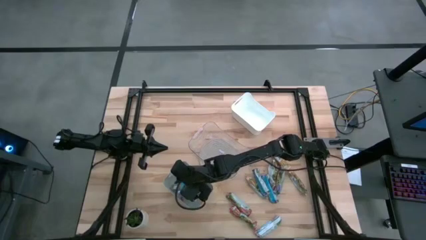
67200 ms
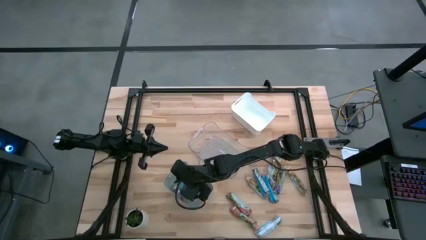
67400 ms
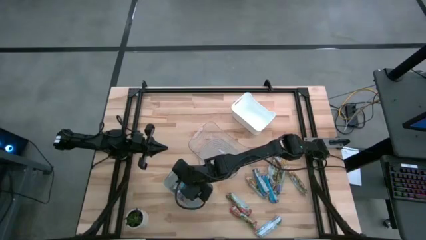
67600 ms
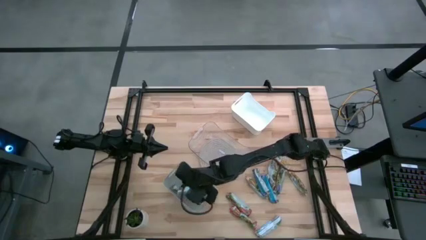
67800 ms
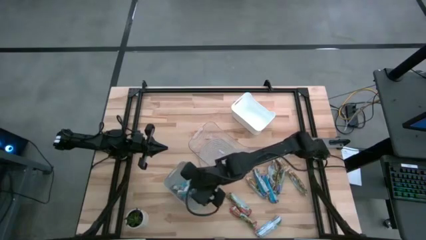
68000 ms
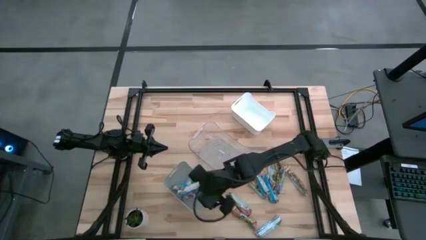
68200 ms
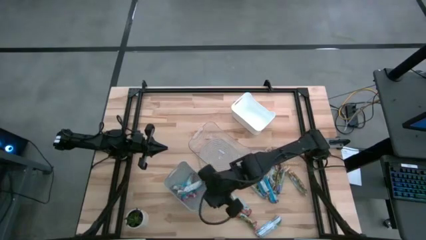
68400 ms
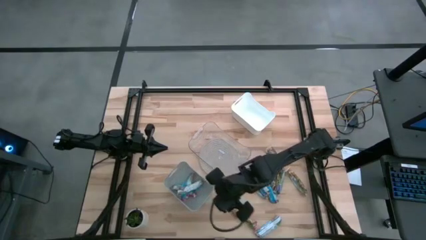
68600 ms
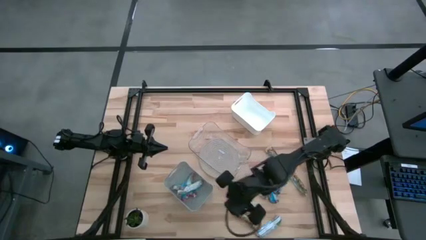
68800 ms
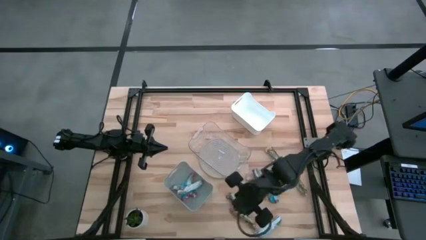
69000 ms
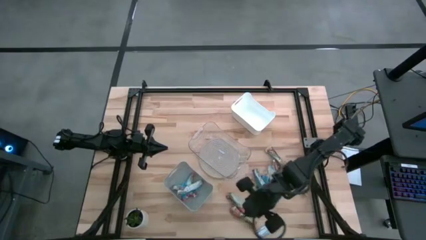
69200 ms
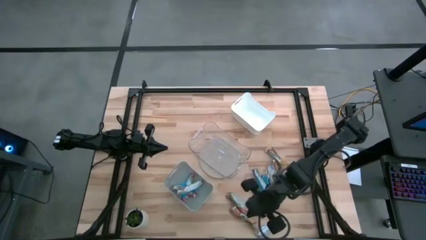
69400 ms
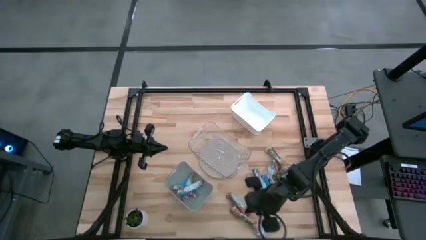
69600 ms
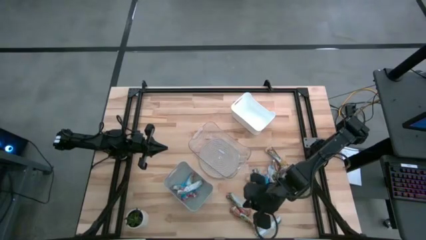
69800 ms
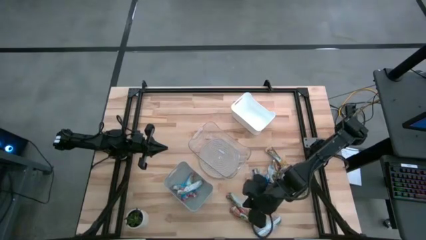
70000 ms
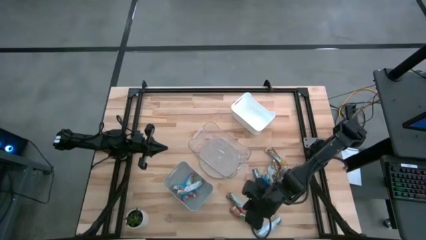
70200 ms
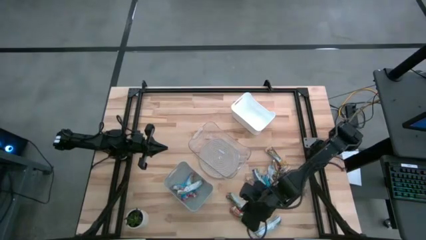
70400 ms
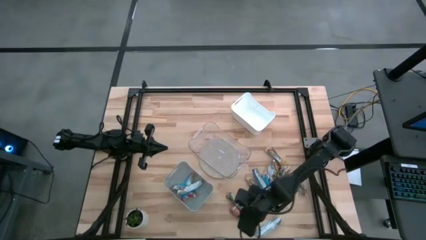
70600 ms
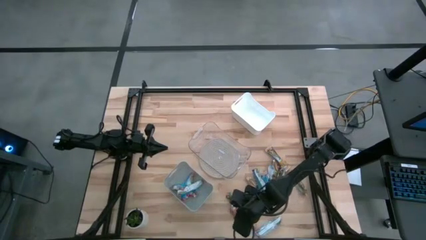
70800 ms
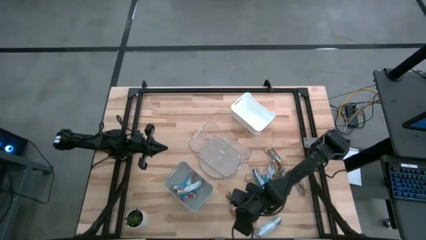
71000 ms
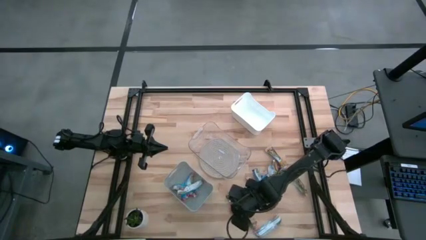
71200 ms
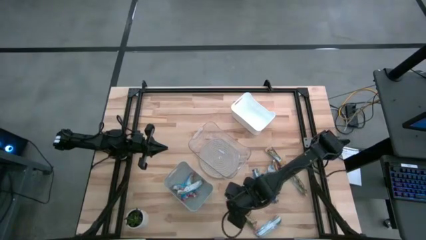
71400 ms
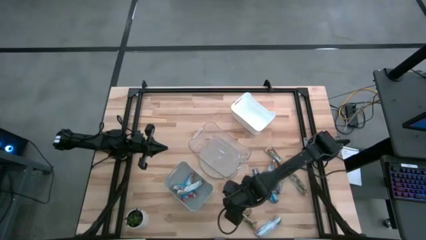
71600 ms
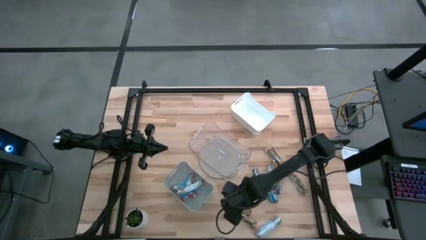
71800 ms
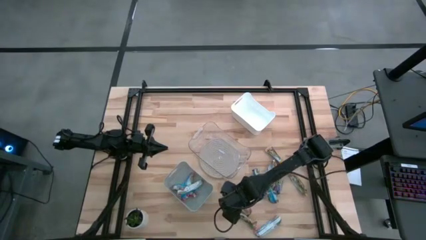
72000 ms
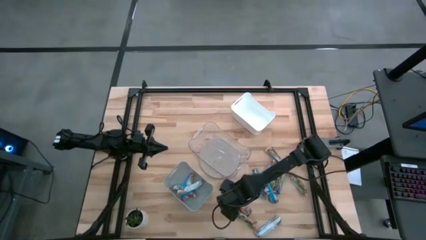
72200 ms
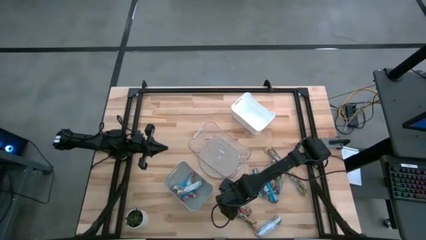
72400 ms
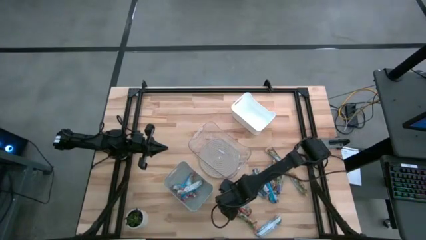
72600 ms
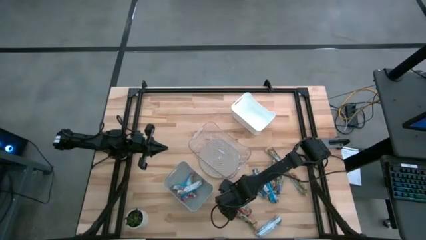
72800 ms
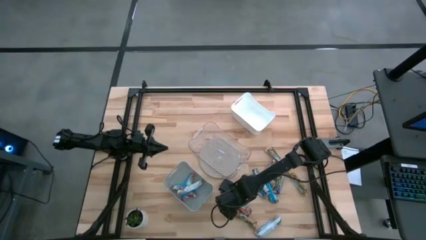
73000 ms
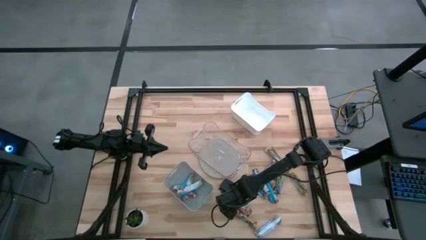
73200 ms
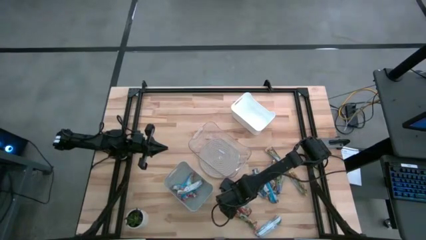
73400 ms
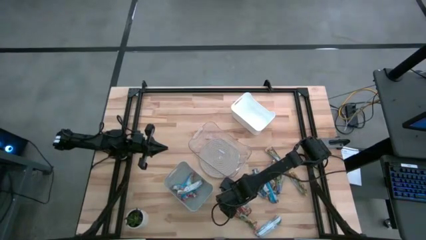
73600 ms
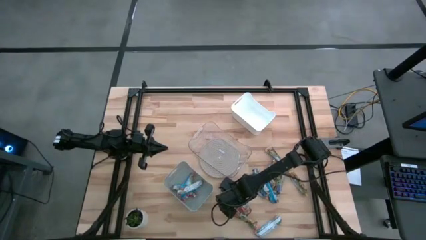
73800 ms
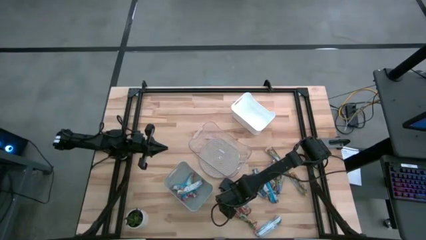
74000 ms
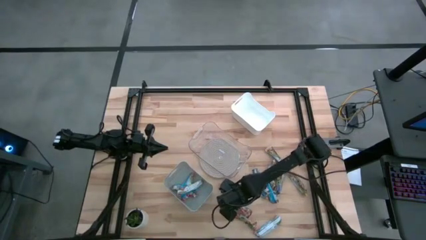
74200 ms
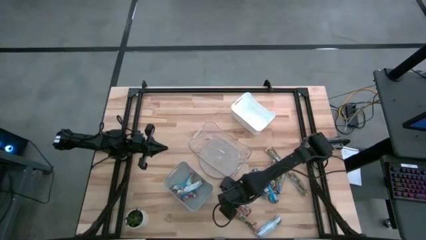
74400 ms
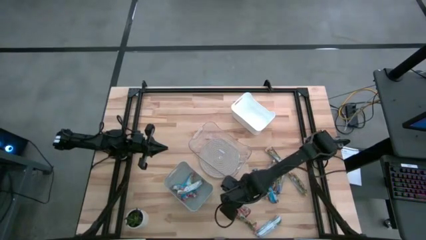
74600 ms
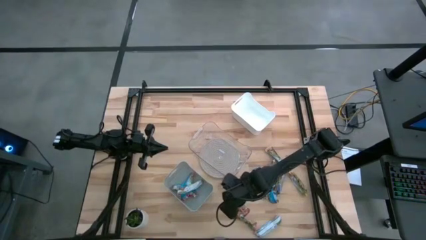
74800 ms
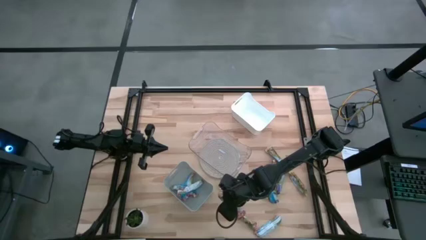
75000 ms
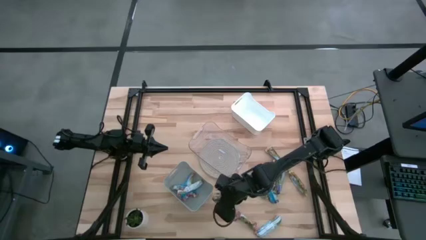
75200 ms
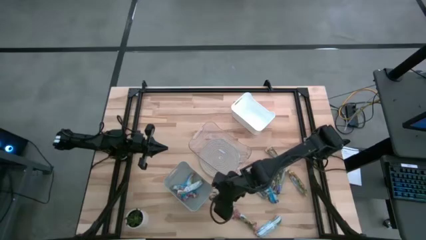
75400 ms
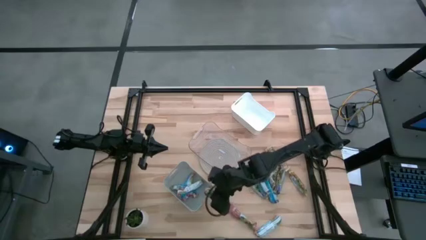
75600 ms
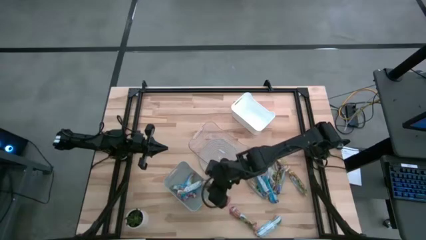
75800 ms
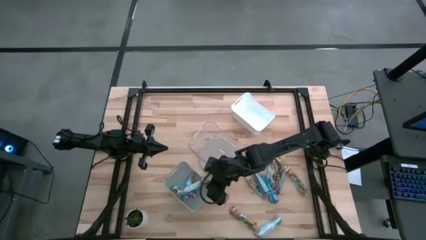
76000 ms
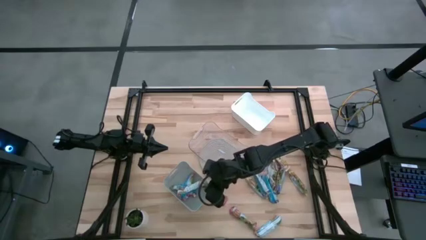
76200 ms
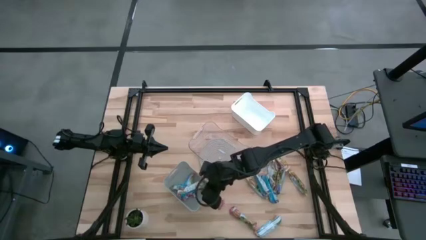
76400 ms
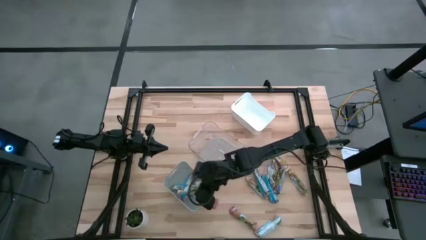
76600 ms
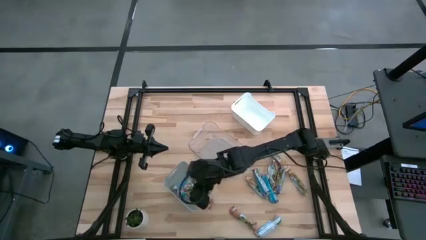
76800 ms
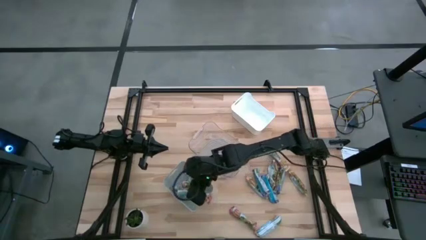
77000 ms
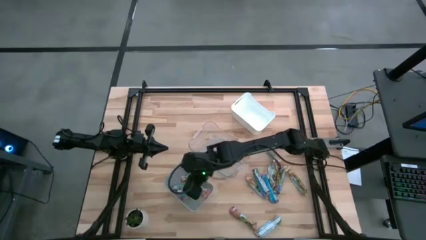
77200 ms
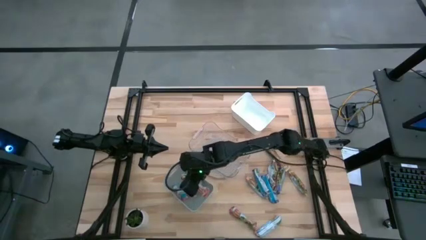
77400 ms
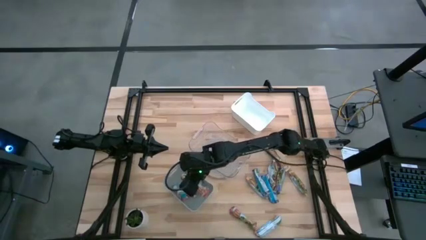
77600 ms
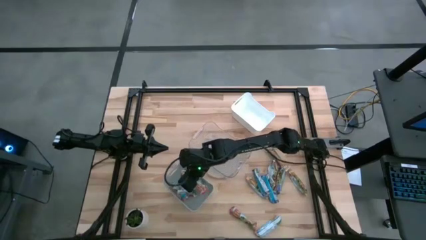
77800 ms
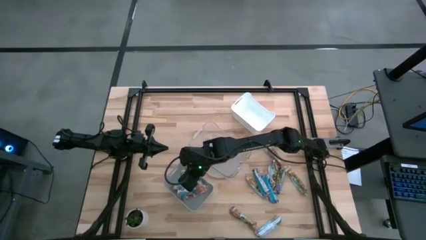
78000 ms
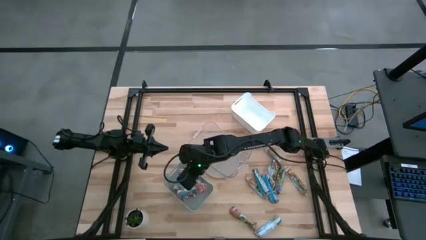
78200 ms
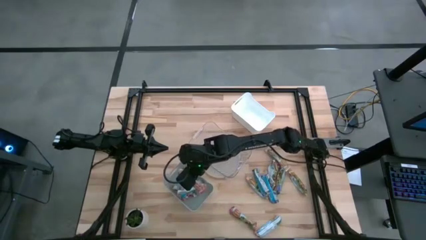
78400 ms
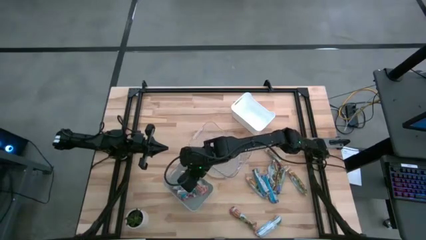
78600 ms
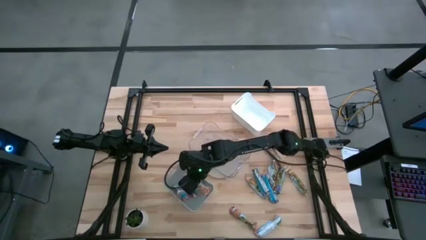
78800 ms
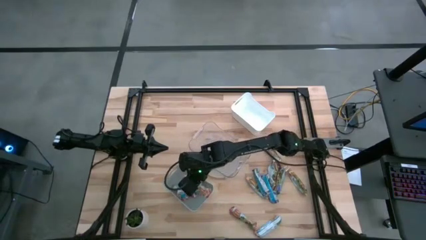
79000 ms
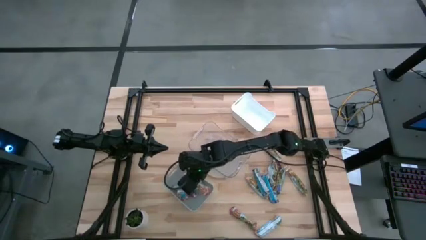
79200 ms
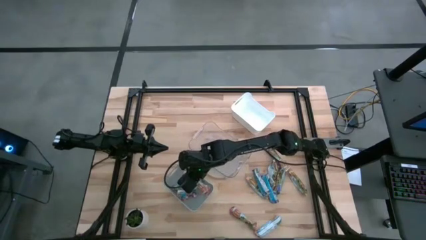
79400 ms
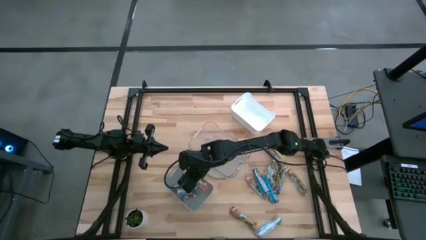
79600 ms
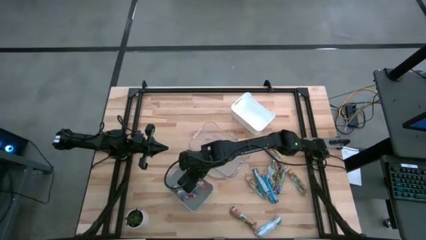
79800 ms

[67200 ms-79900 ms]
Task: Pick and place Granola Bars by type
Put the red granola bar into the gray bin
